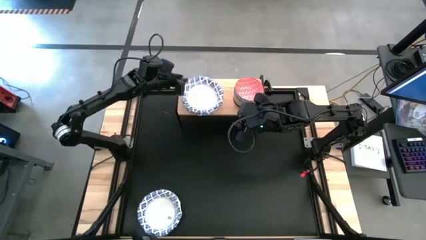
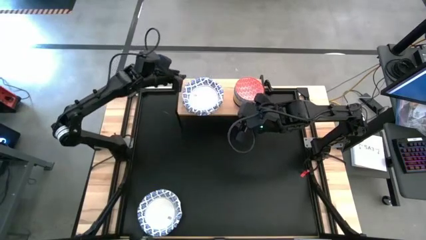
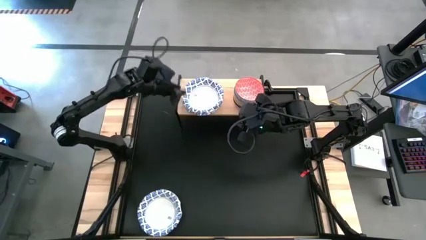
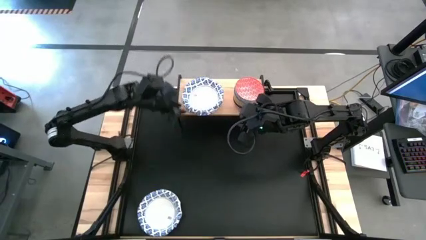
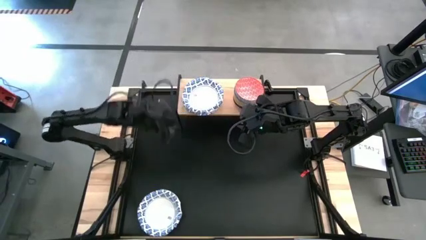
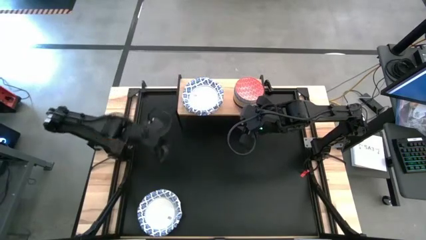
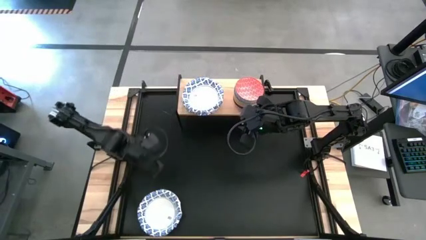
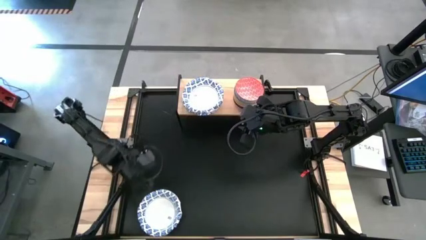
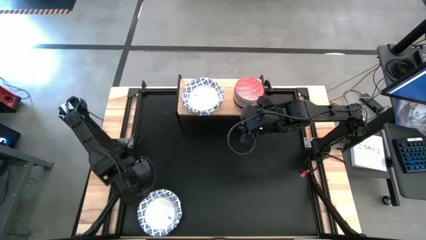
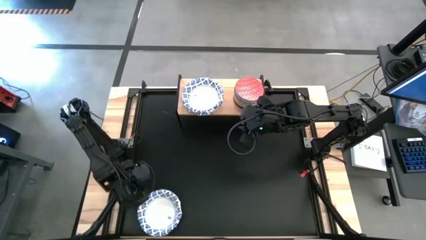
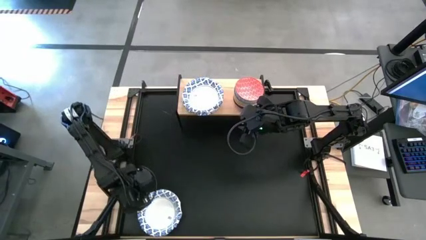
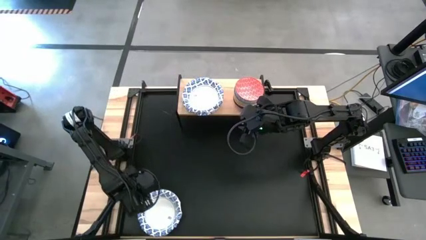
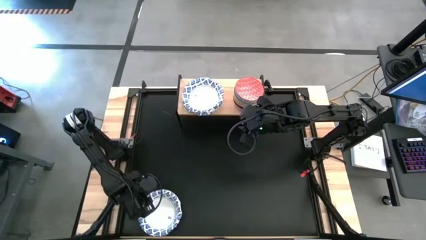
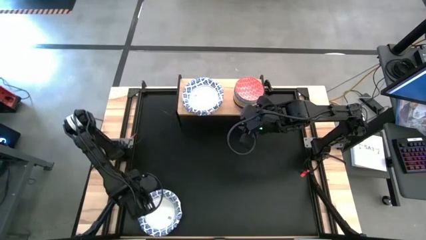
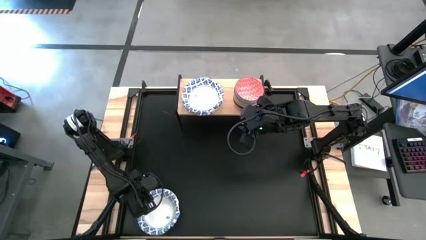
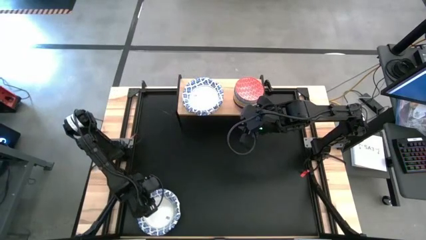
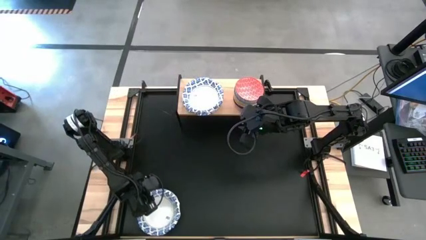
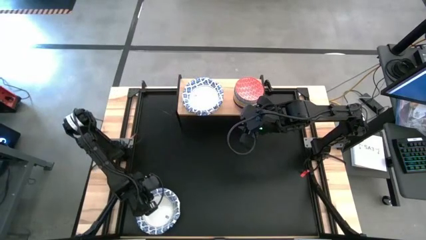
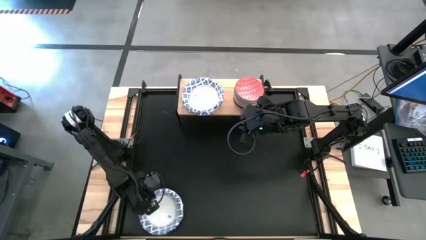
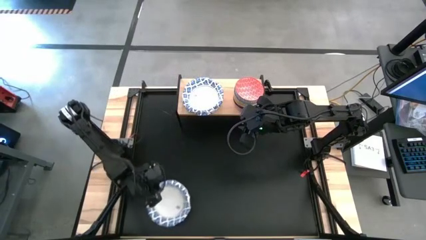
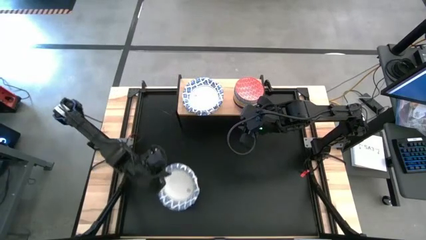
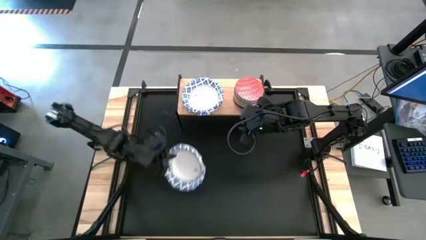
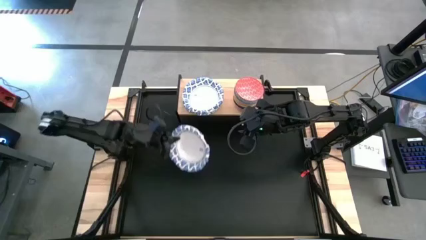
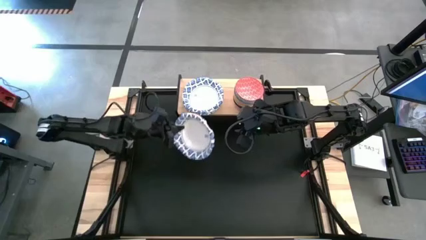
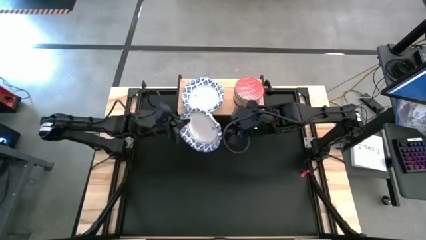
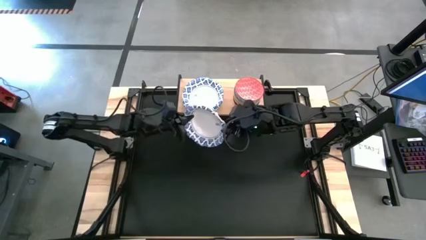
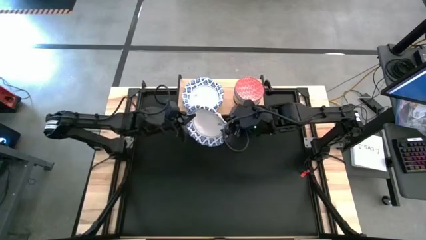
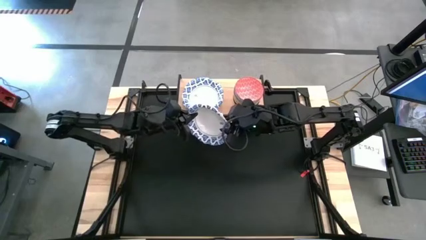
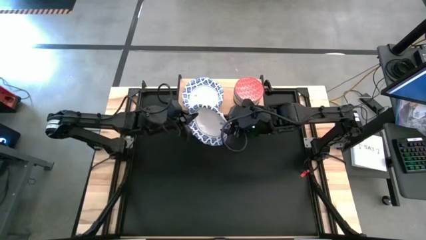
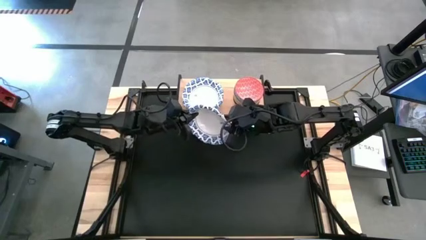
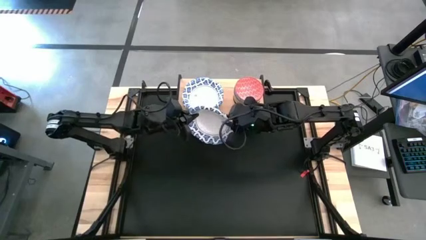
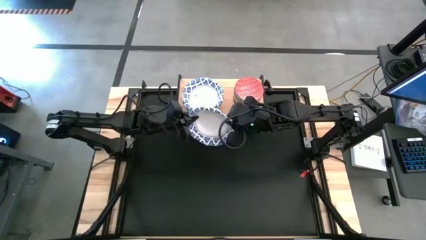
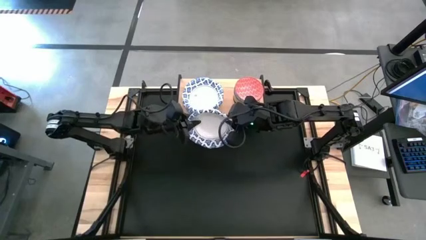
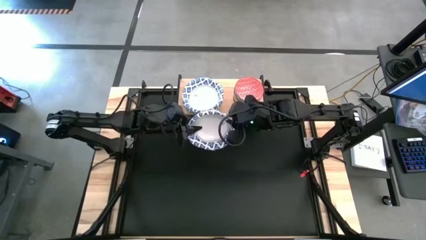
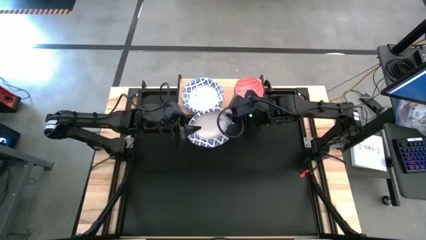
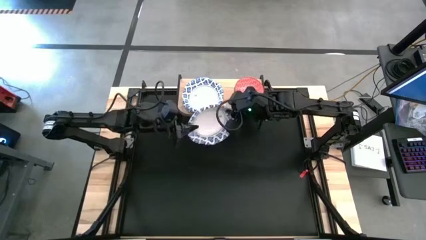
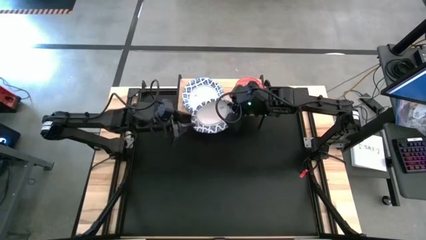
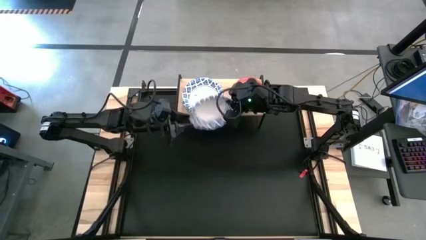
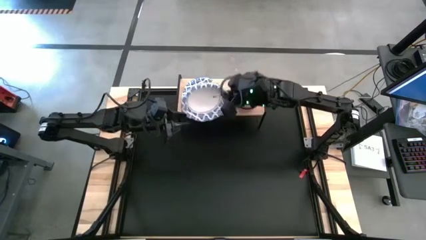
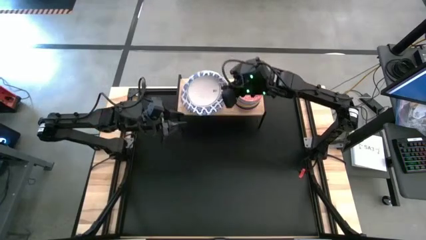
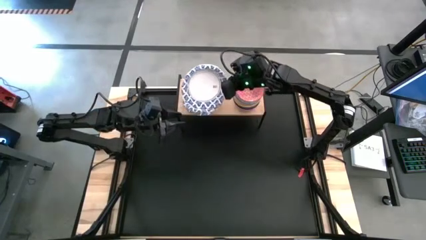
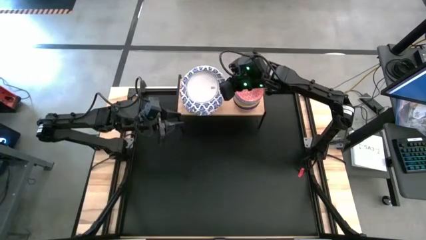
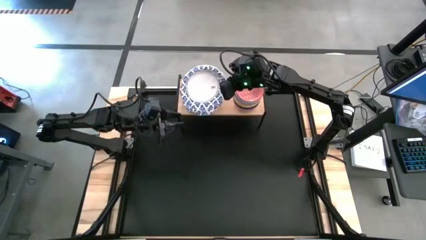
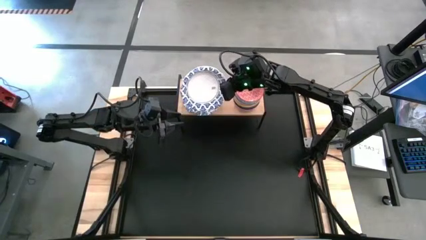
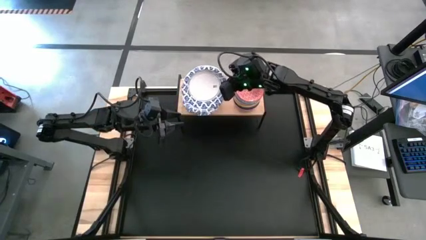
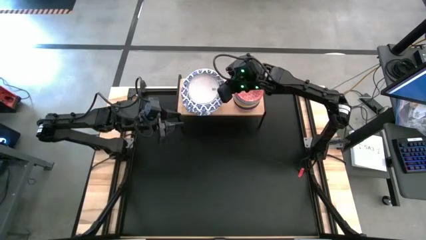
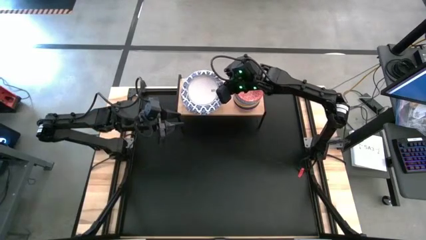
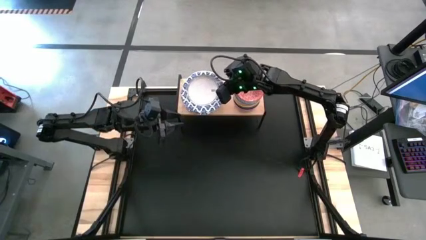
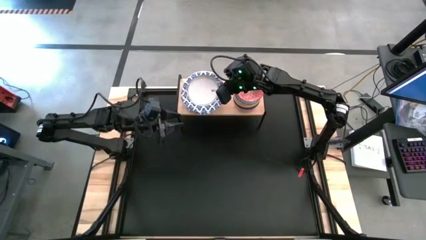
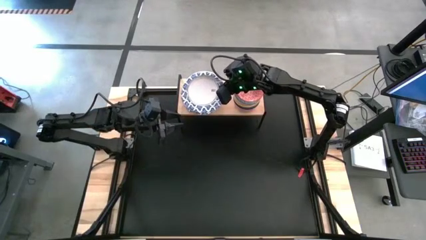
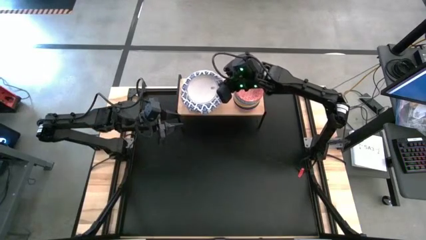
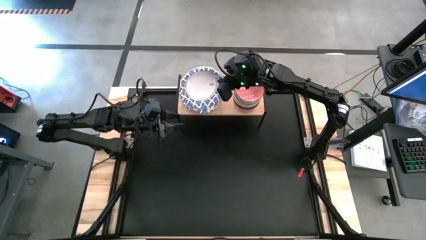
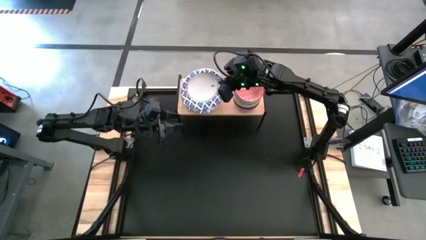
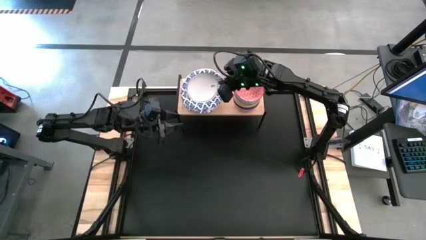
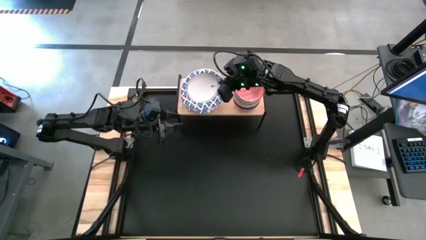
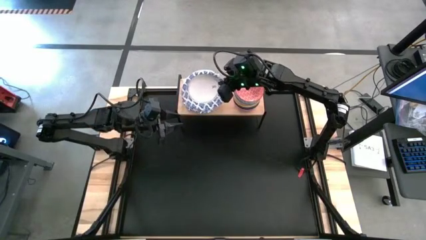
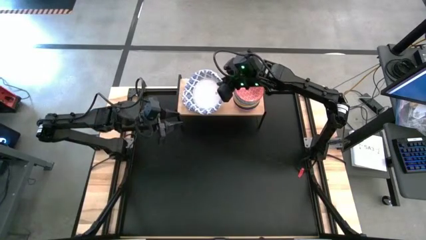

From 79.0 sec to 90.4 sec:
Task: Place and stack bowls onto a shelf
Stack the blue bowl on top of the stacked bowls on the shelf

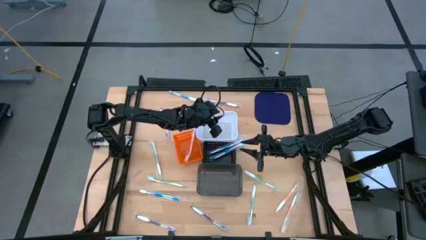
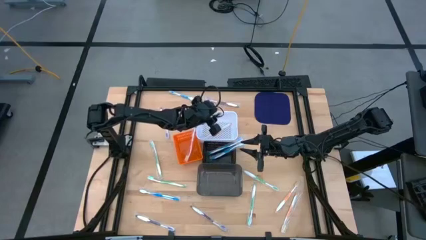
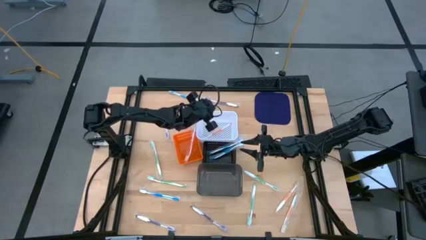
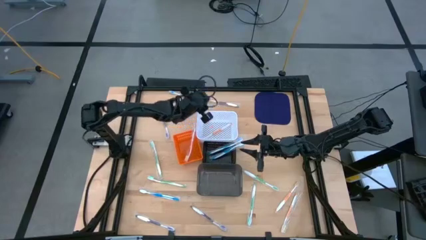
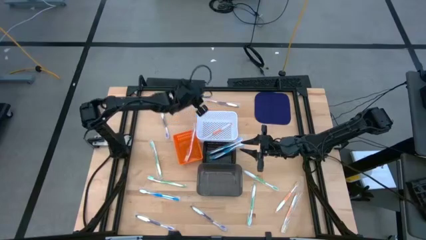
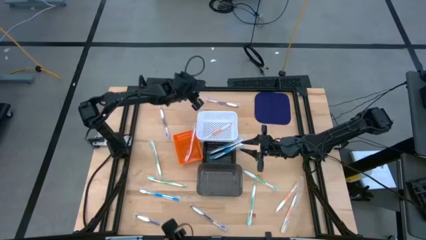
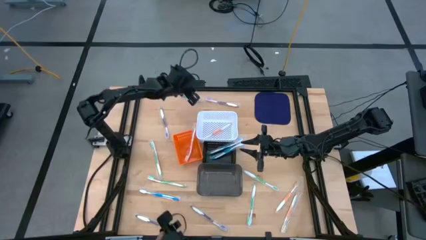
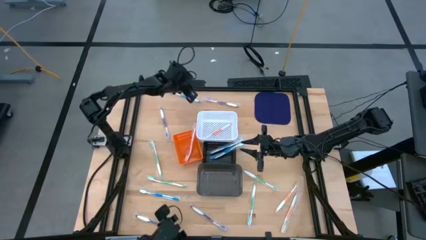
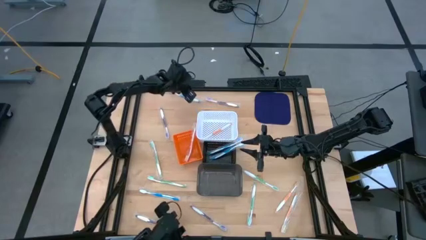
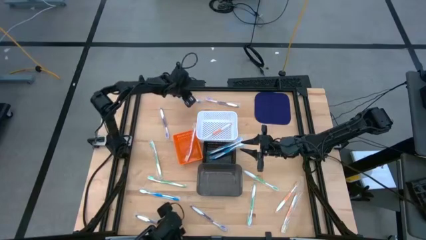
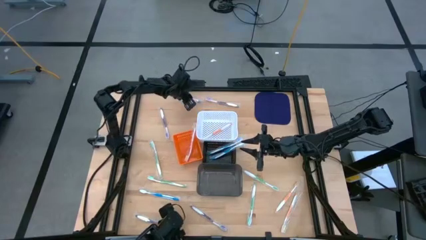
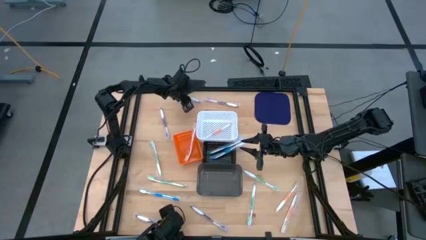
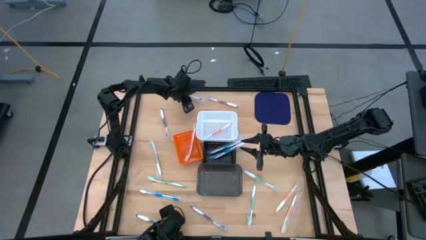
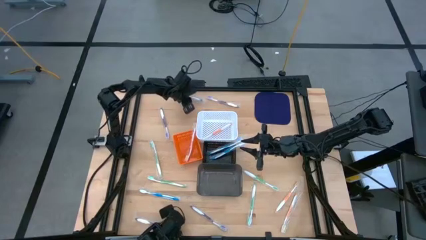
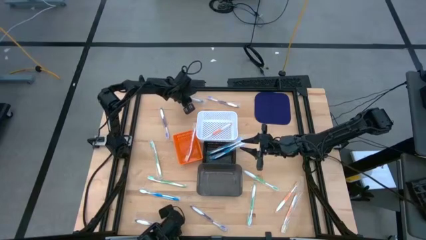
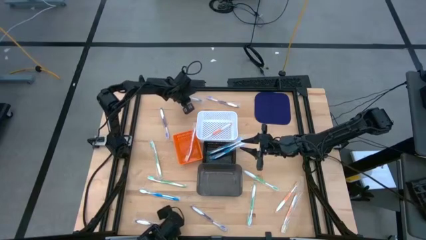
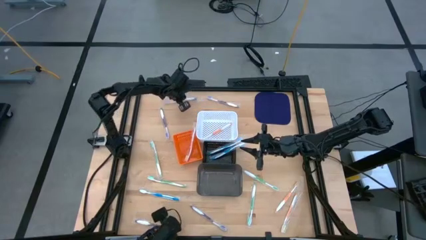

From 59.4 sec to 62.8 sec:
Task: Pick & Place Toothbrushes
Put the top blue toothbrush into the top black basket
